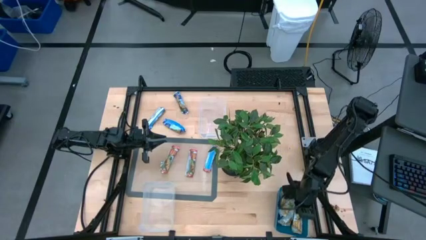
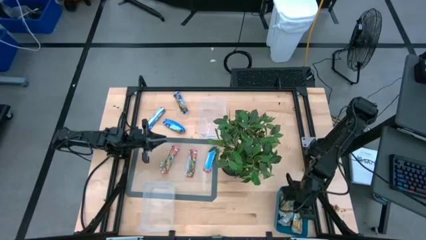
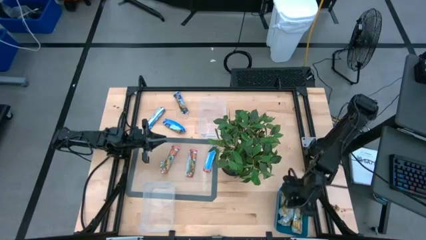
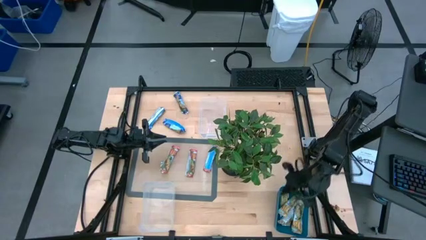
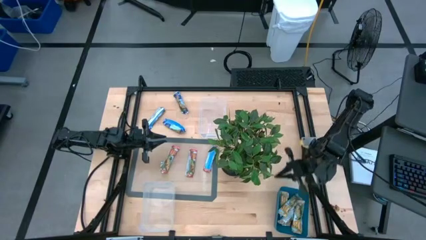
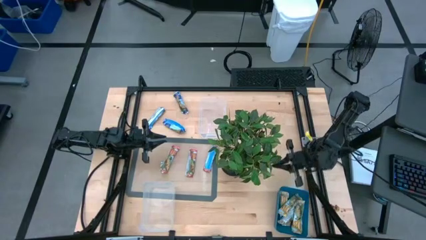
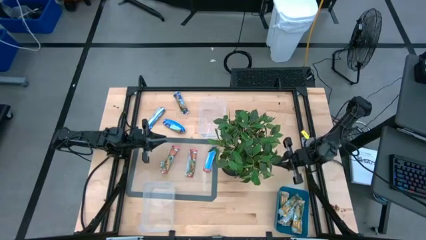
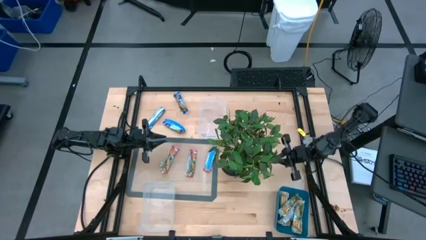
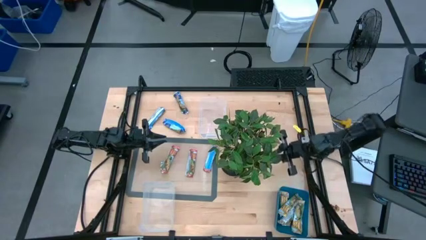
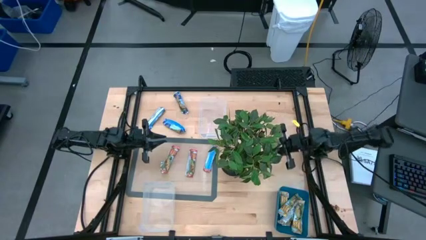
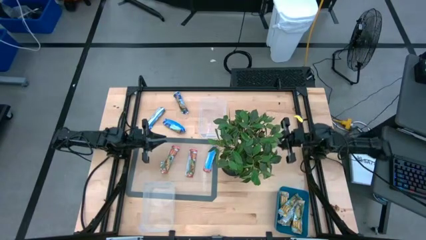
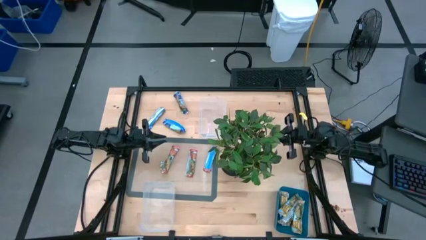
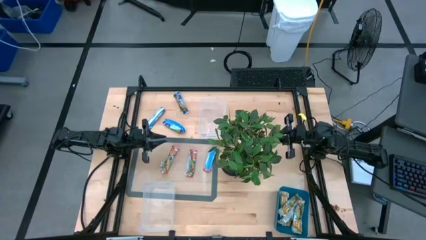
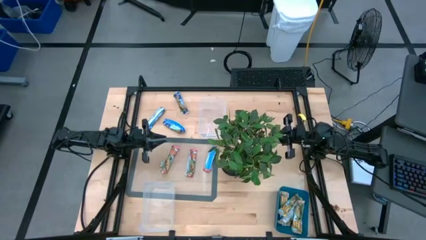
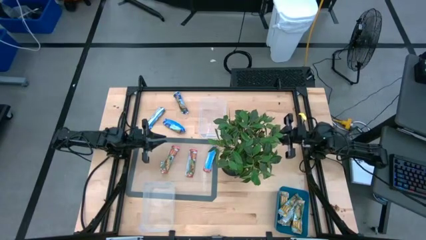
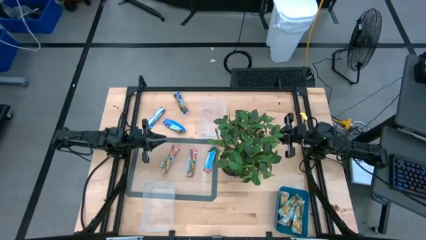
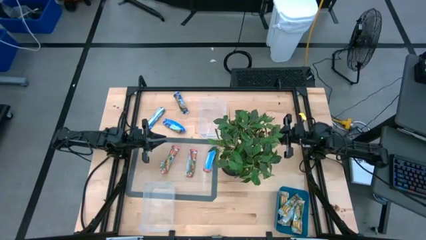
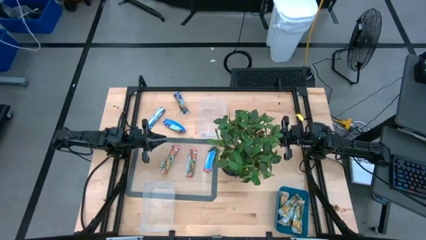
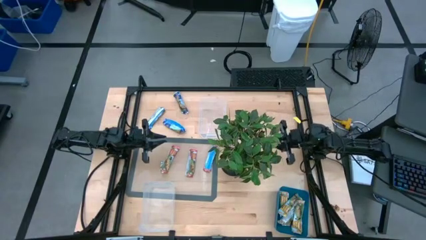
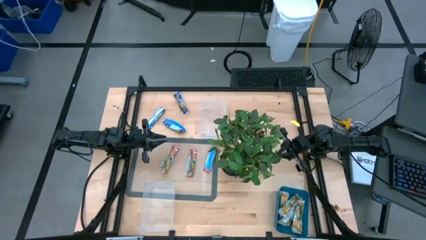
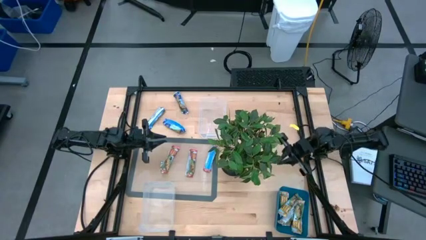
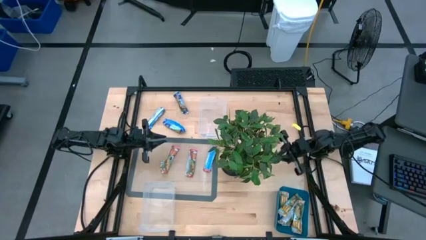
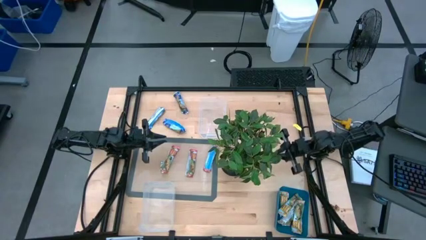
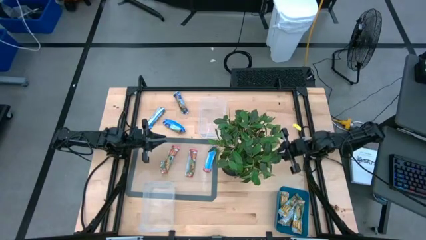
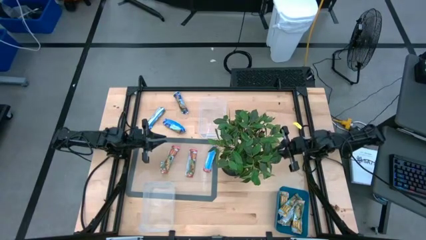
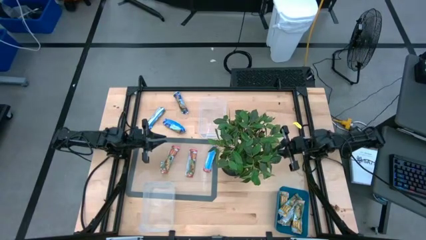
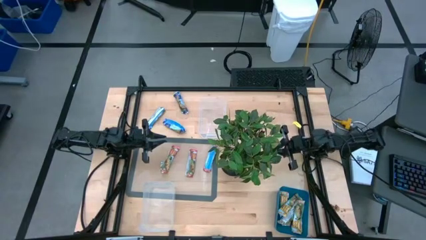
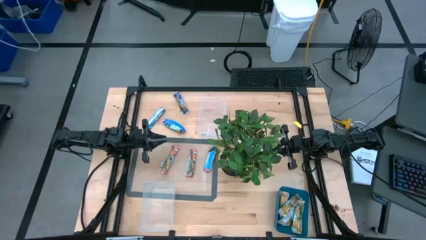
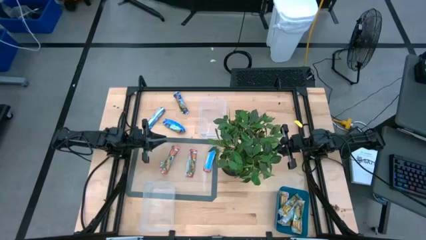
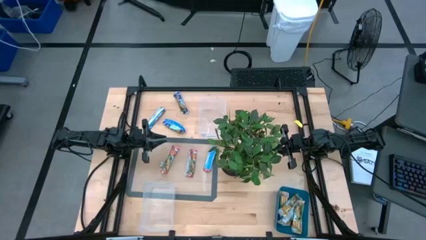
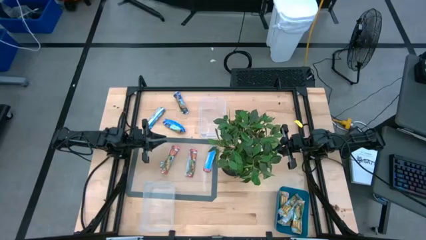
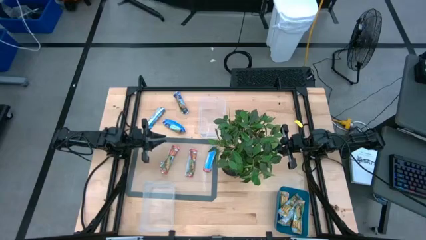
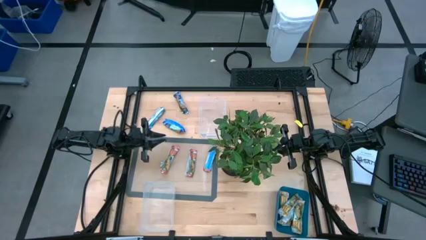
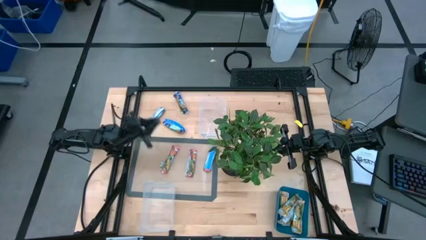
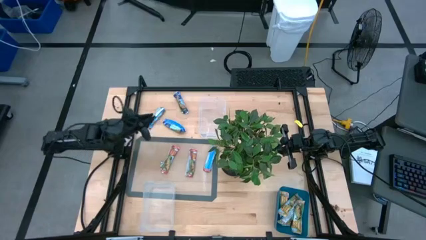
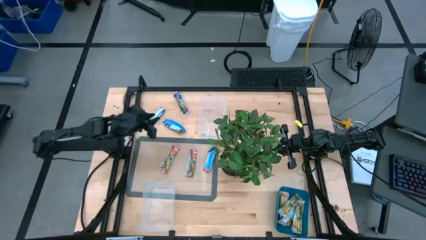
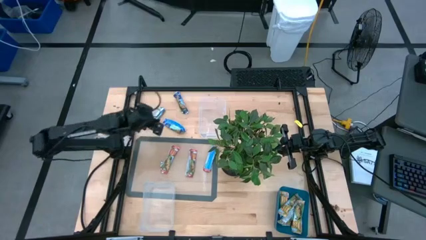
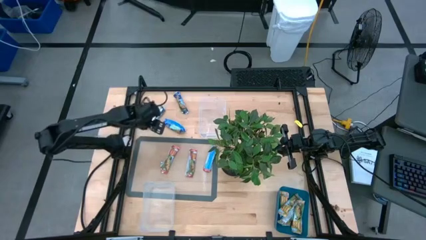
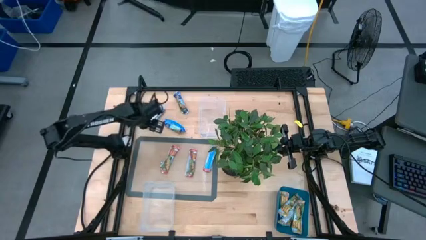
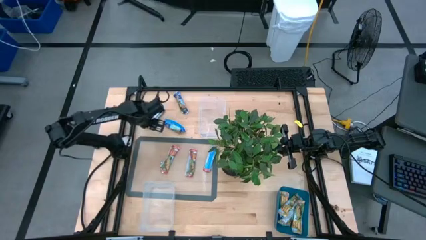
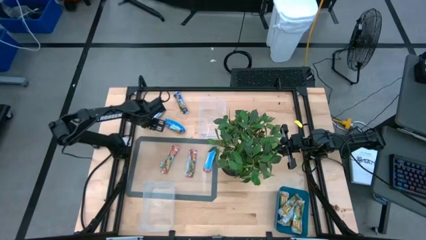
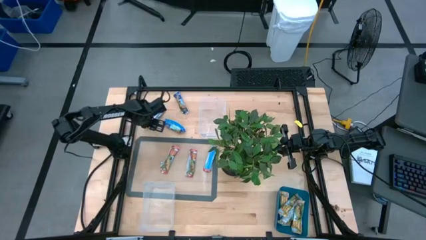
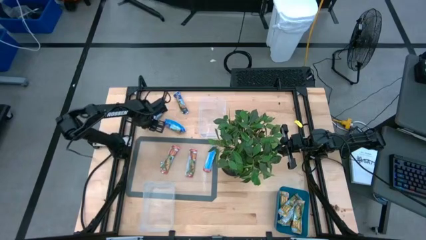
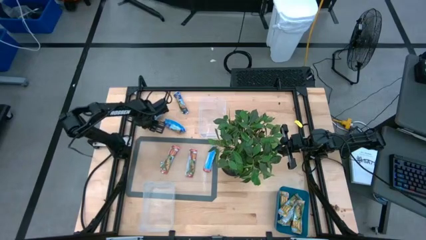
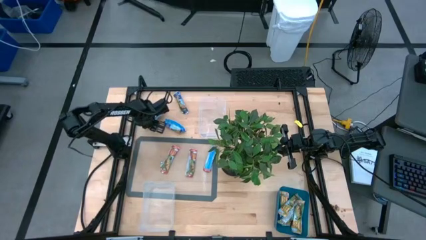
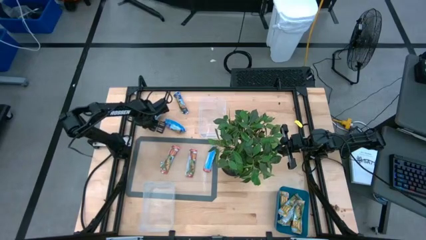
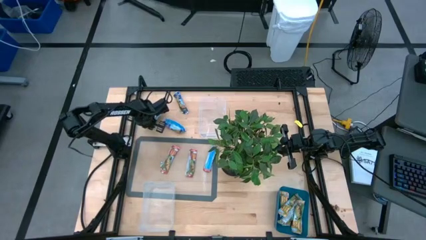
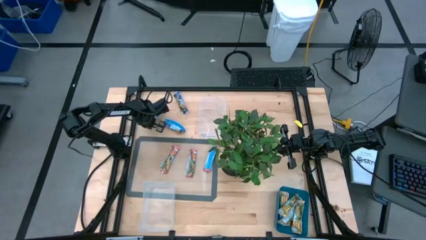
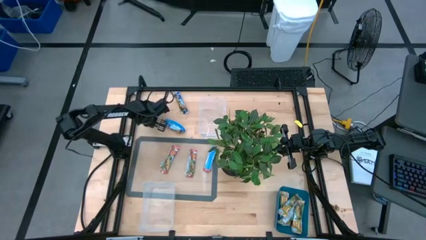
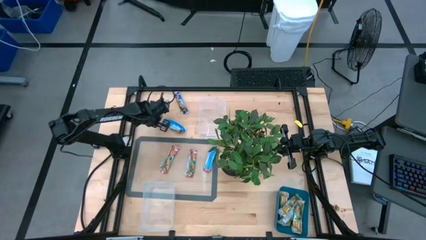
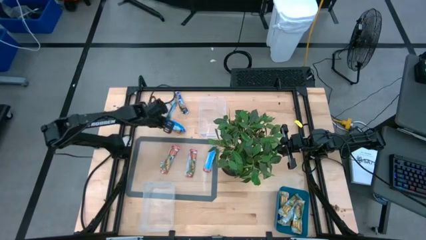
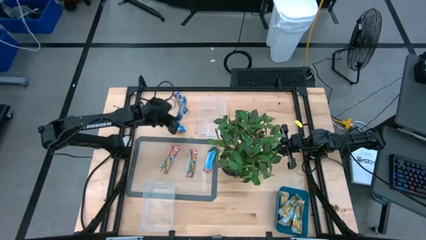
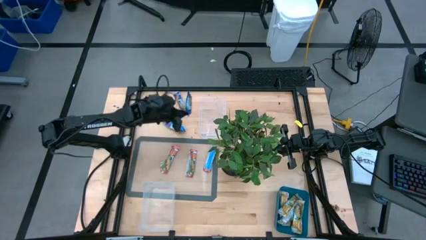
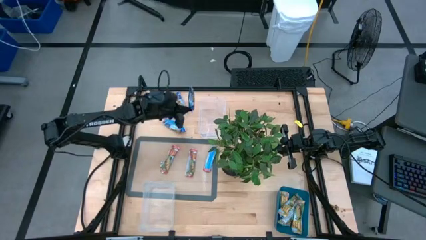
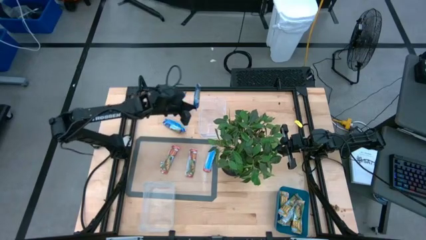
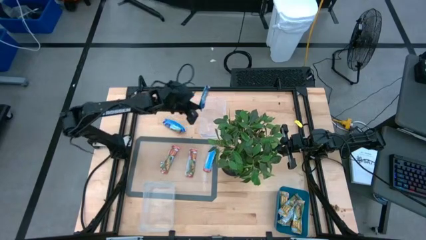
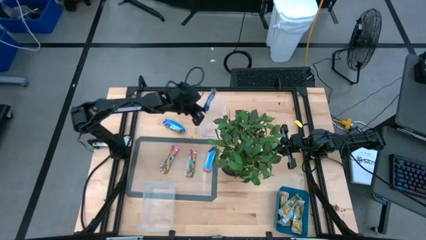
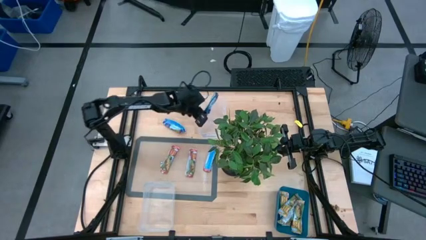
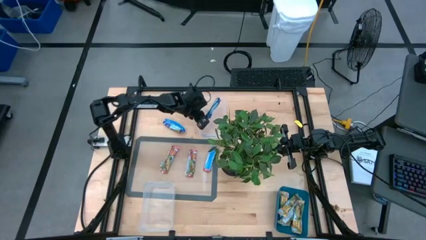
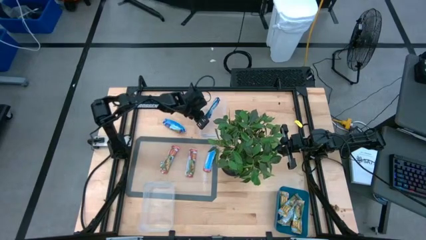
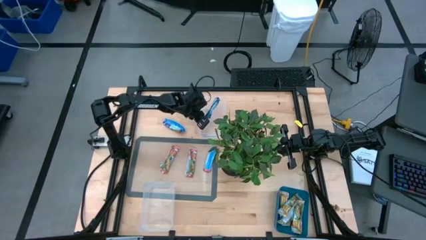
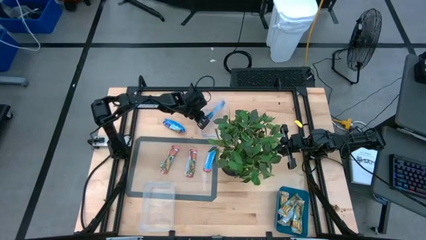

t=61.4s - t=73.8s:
Task: Pick and place Granola Bars by type
Put the middle left blue granola bar into the top transparent bin

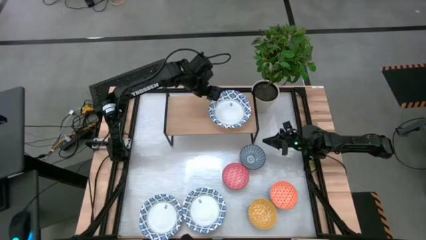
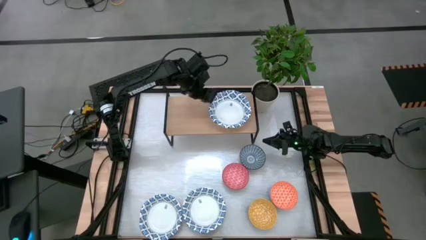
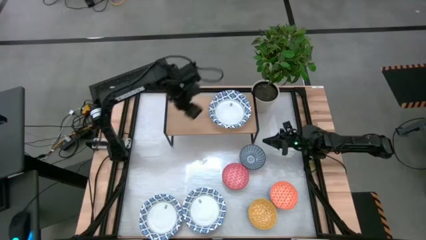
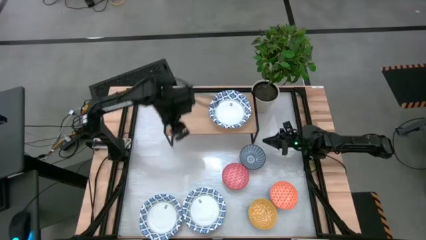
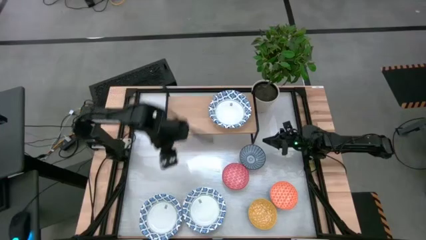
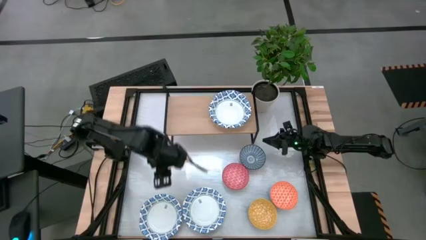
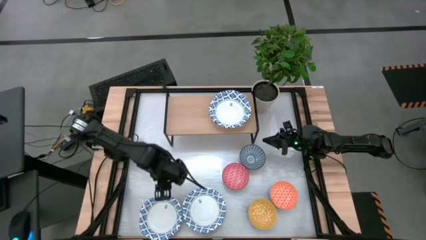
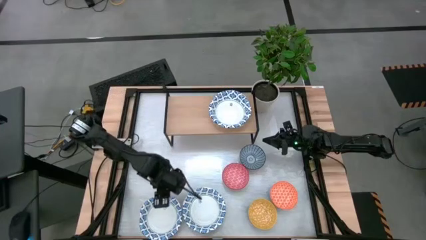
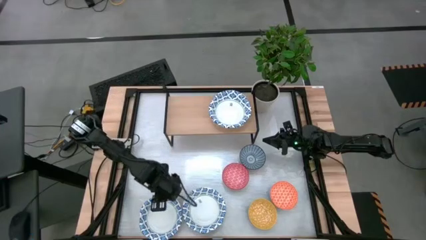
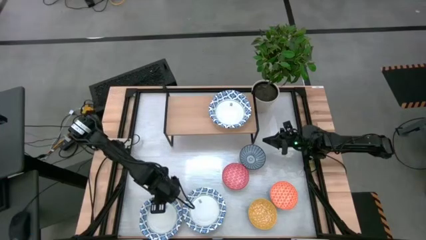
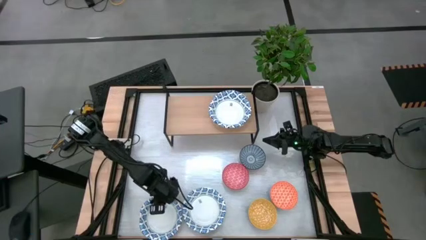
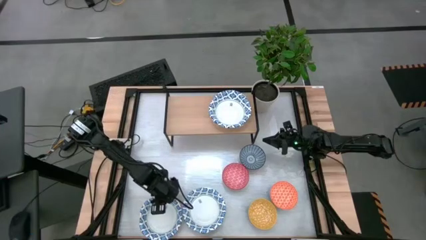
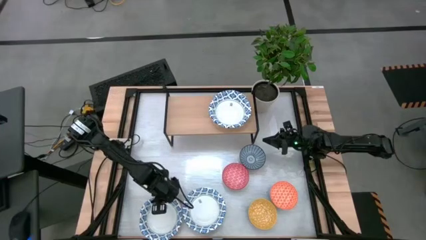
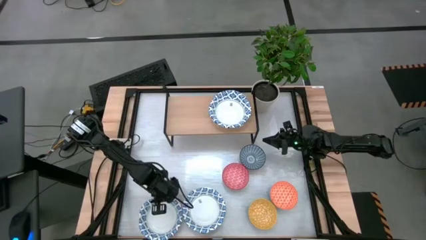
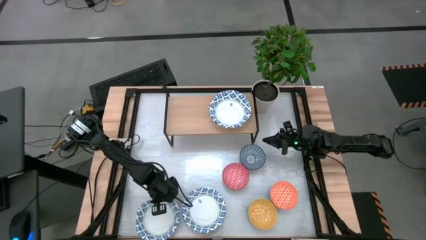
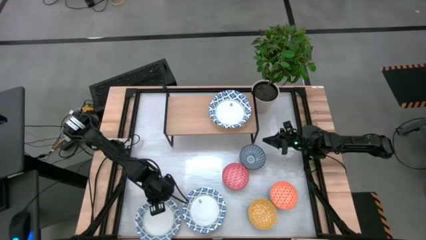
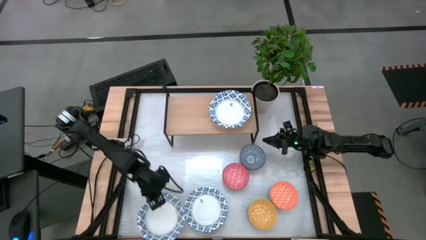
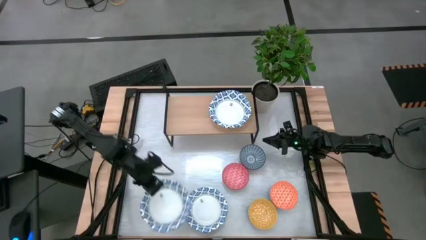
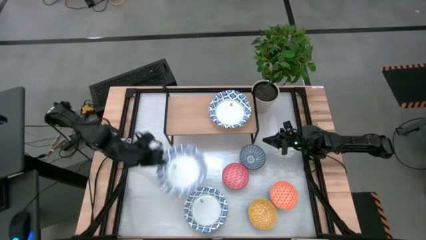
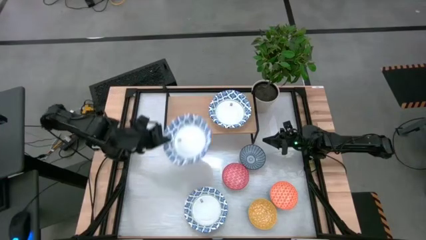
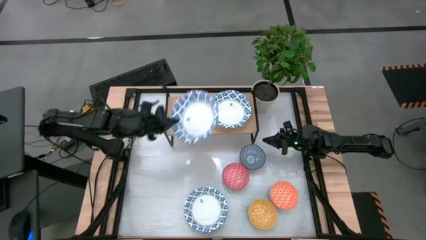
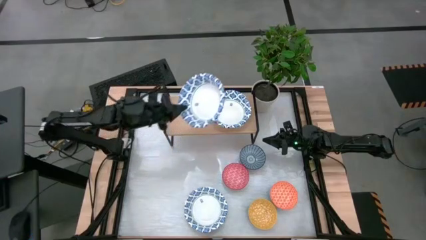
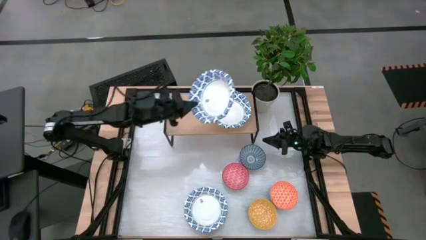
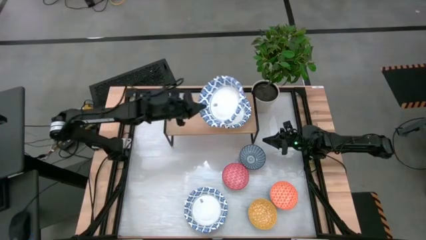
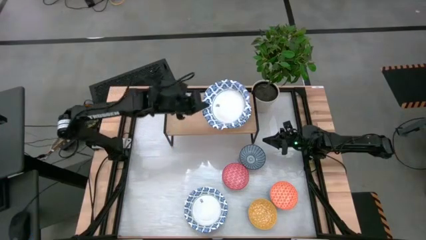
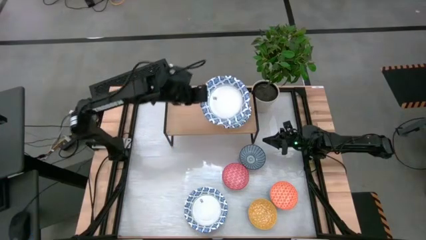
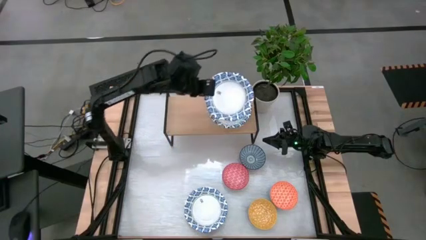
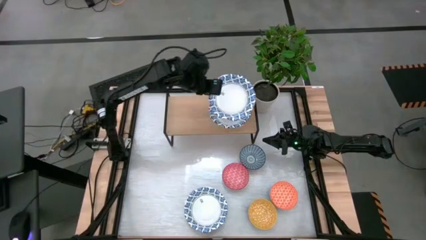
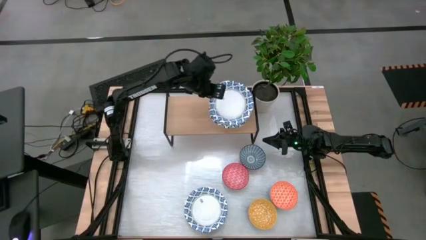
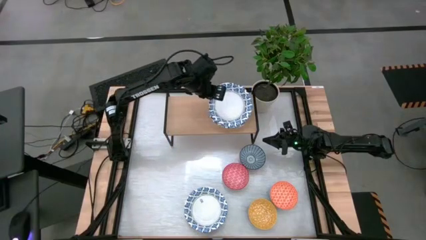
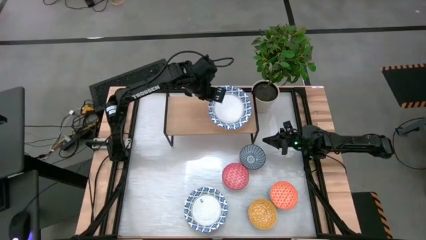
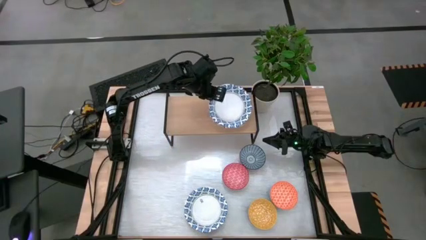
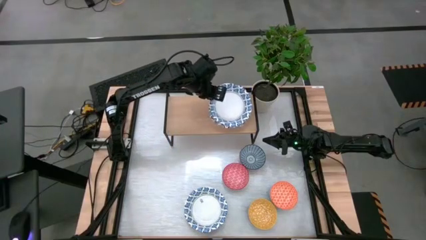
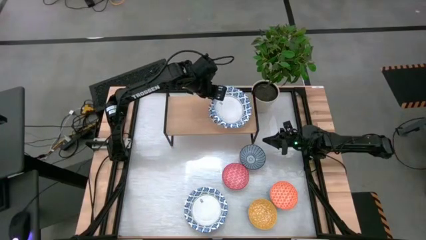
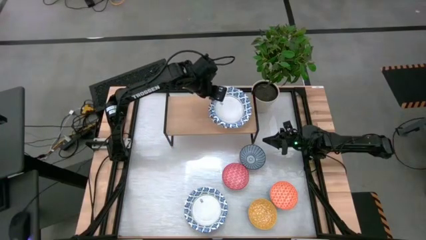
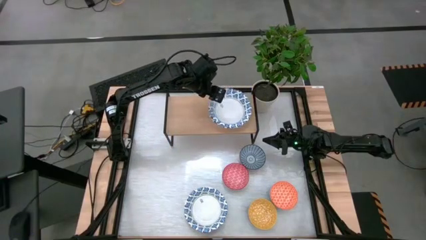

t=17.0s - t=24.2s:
Task: Place and stack bowls onto a shelf
Stack the white patterned bowl on top of the other white patterned bowl on the shelf
